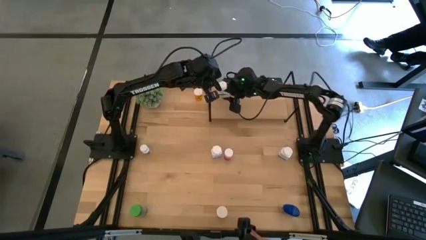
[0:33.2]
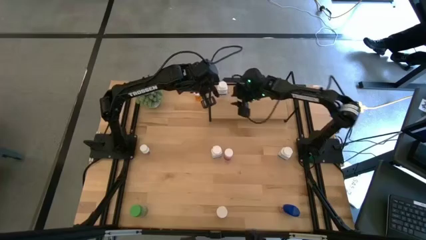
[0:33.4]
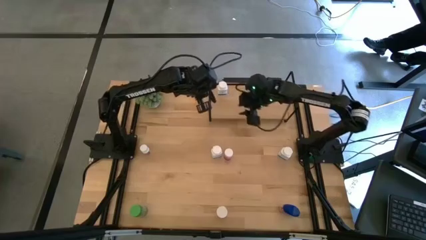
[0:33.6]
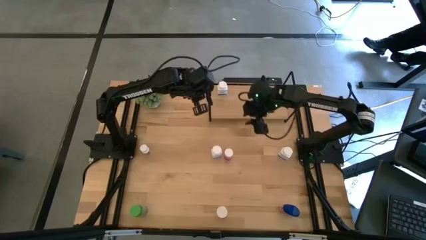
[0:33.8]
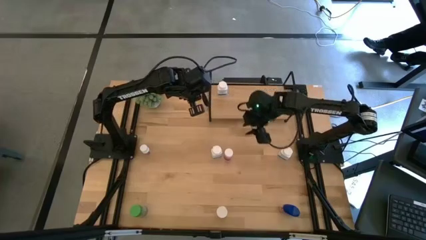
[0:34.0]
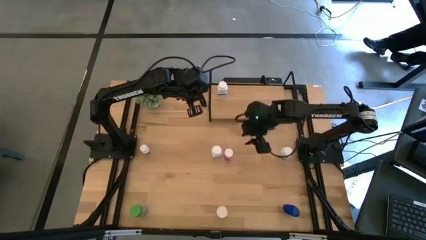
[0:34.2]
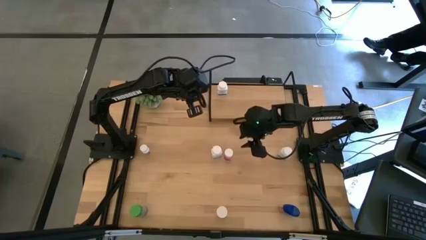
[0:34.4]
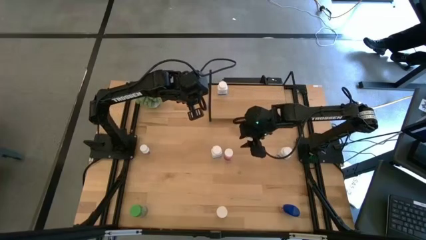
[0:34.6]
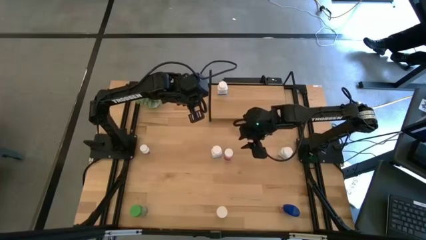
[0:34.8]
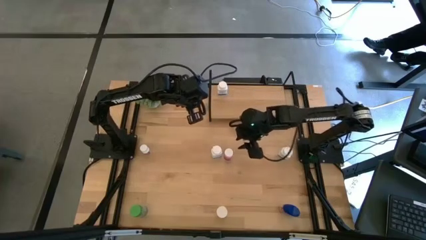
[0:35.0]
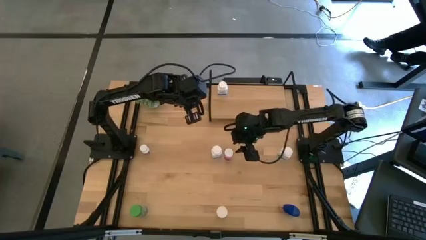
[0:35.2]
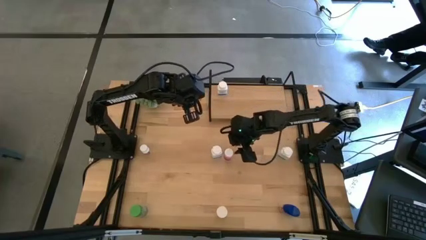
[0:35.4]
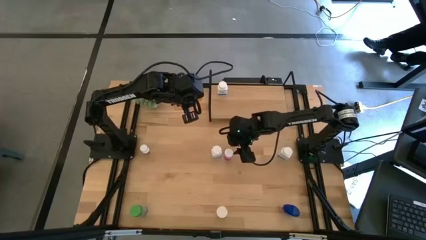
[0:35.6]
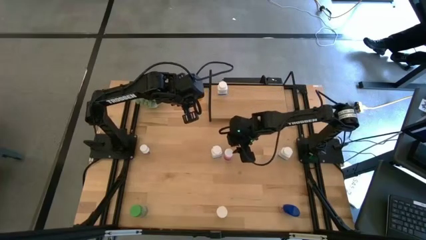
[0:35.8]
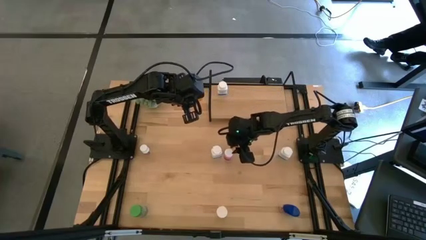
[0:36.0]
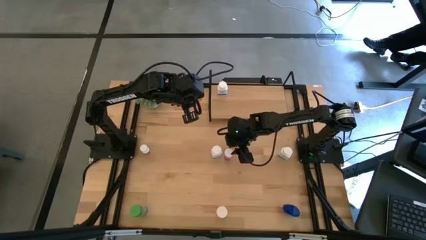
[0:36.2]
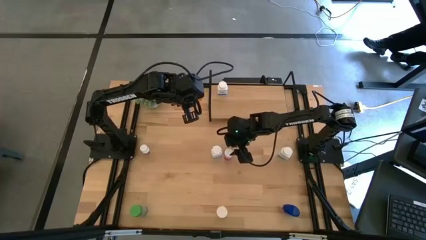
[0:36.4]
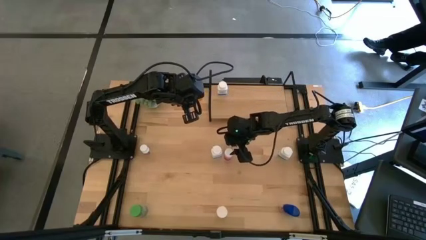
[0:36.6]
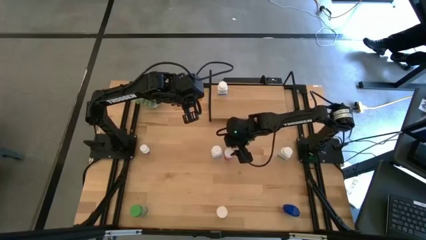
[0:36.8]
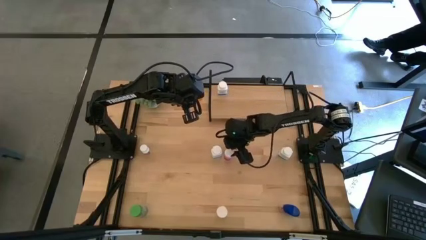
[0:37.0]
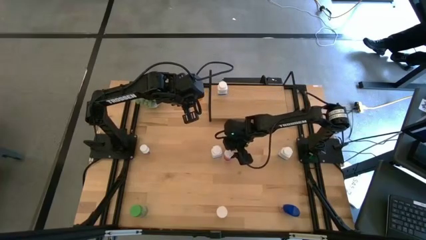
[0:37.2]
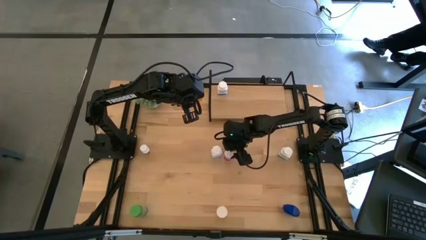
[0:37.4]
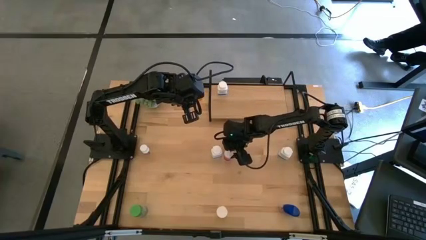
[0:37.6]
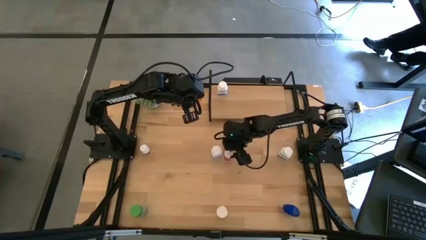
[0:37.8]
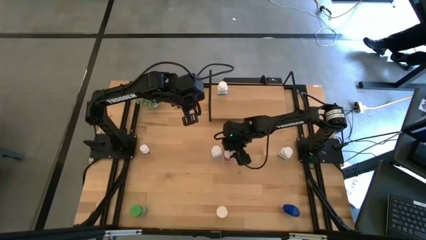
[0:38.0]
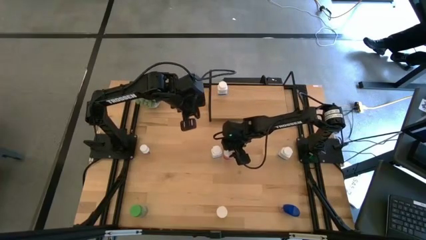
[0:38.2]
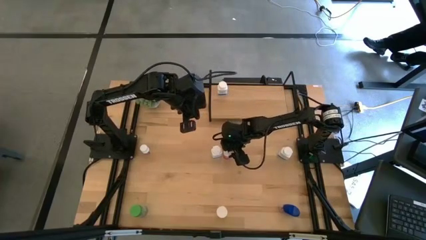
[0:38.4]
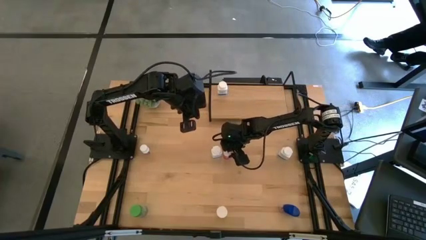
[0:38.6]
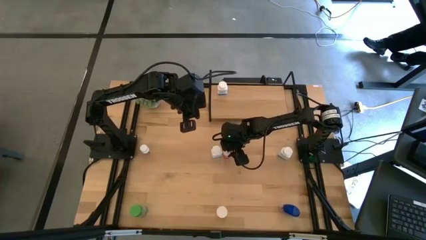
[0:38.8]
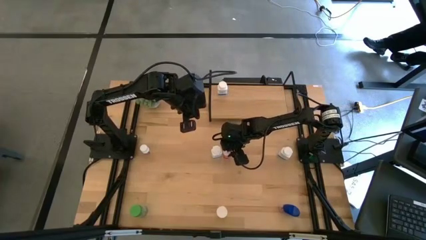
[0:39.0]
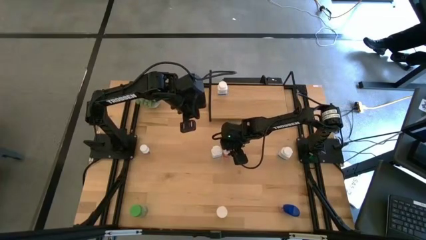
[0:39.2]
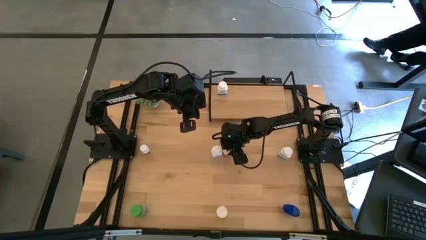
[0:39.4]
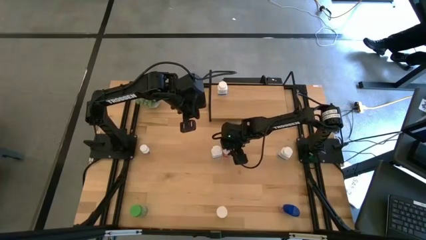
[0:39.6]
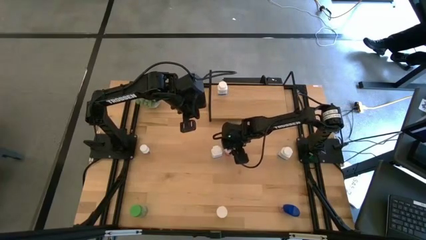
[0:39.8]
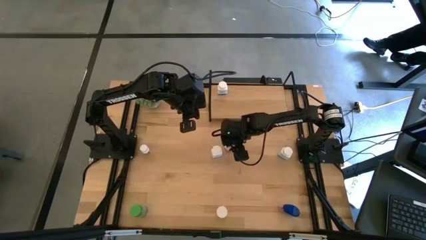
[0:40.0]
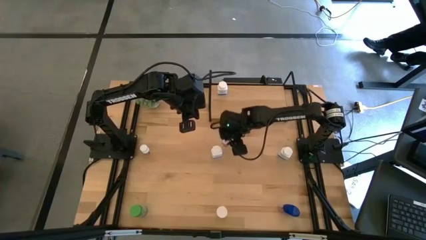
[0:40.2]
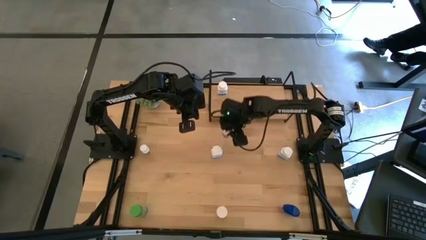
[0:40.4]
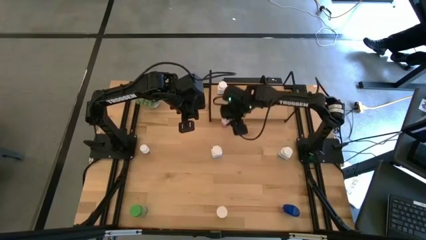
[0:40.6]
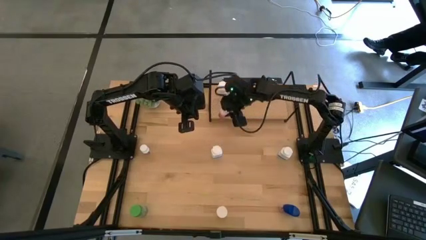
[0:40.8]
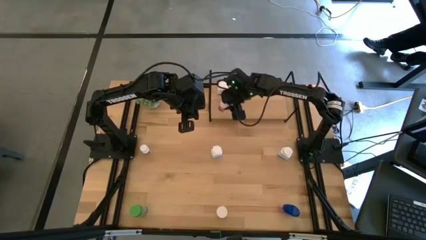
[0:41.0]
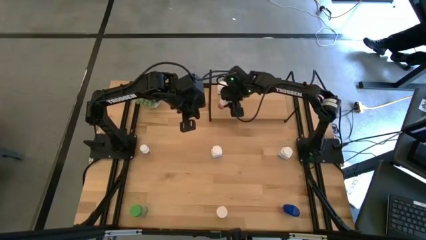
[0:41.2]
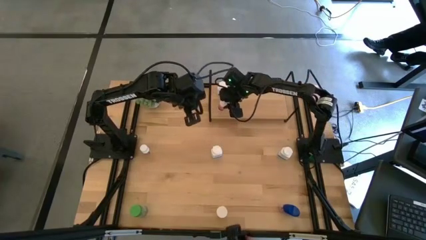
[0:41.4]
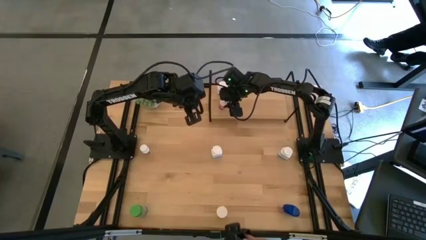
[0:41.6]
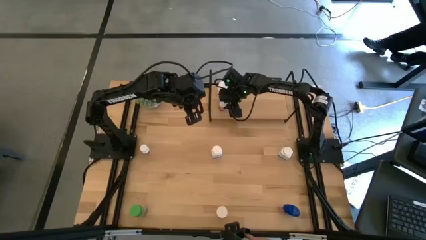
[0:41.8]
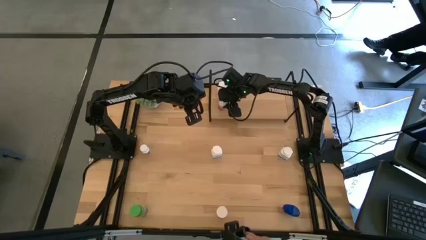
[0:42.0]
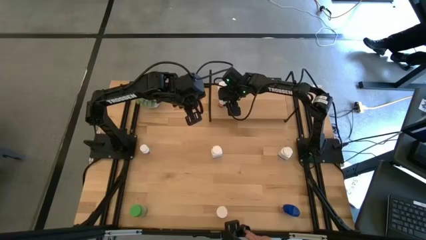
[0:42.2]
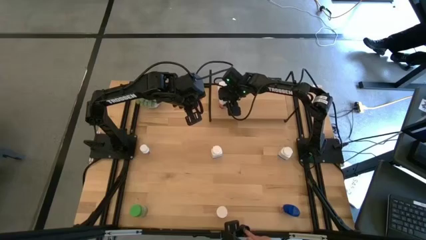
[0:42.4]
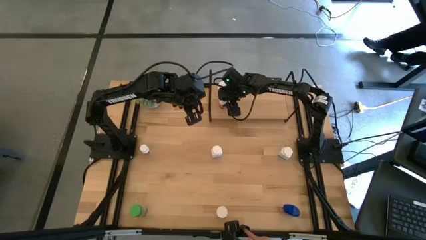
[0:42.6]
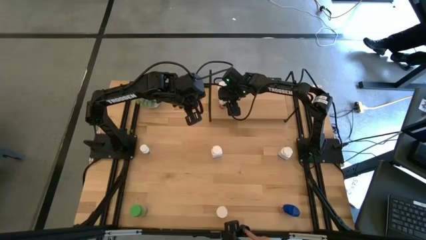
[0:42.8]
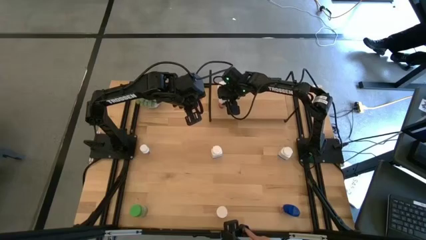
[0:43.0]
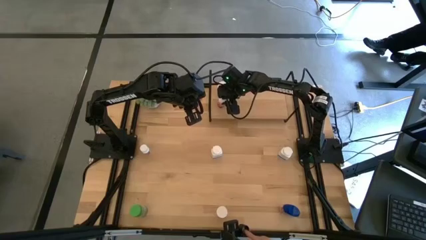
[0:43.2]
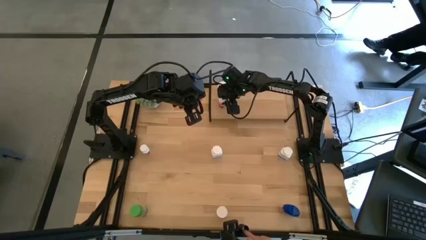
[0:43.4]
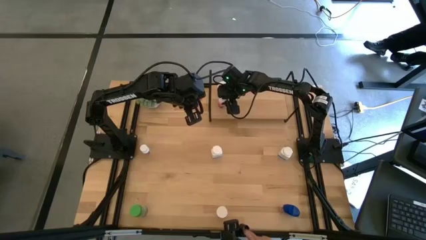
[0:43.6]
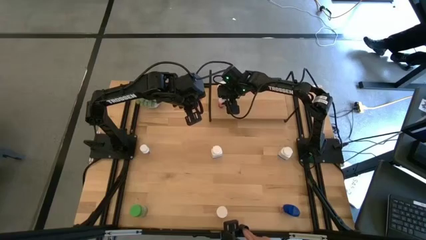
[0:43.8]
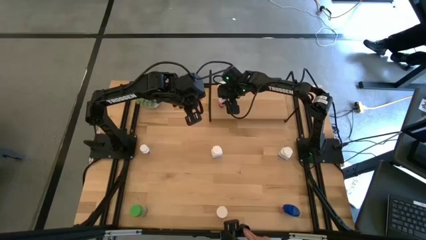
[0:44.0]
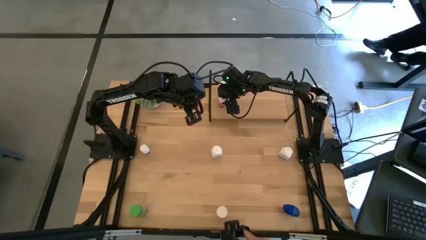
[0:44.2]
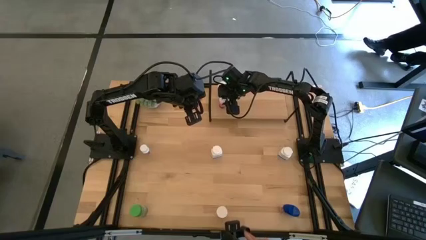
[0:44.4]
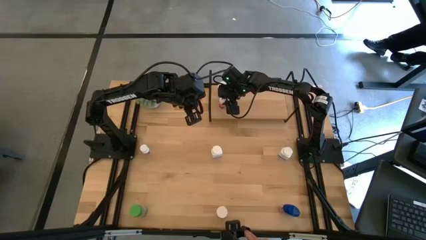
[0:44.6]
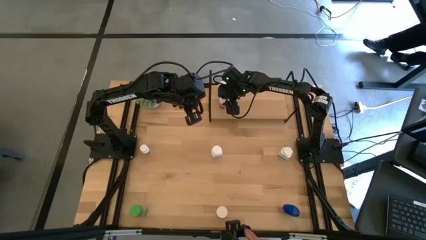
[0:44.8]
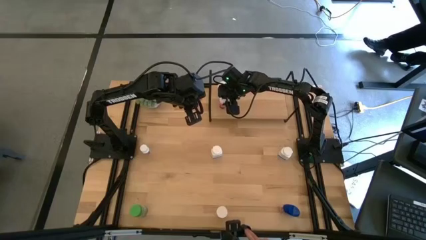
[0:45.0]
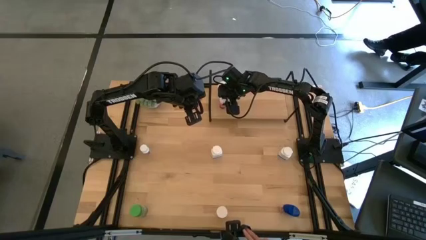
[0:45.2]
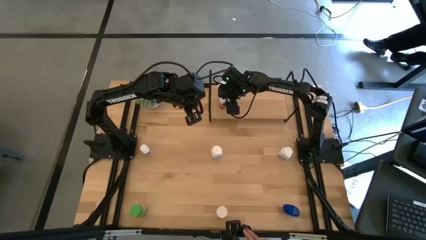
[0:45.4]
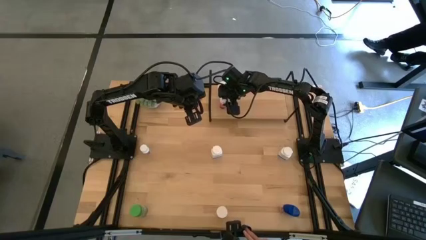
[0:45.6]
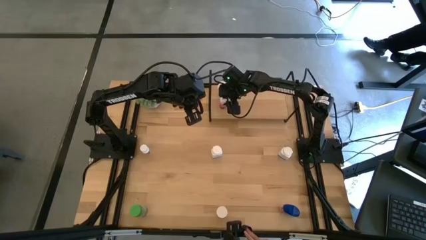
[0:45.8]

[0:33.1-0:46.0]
Task: Pick and place medicine bottles onto shelf by color
Put the pink medicine bottle on the shelf
